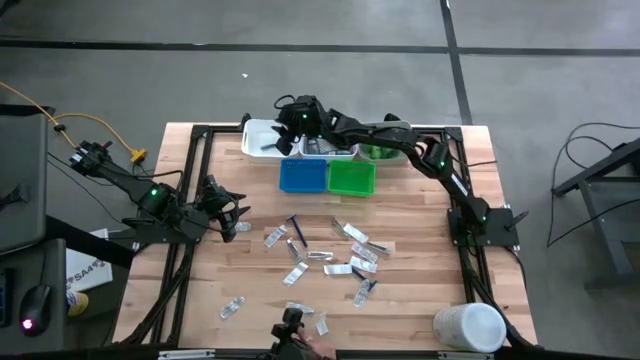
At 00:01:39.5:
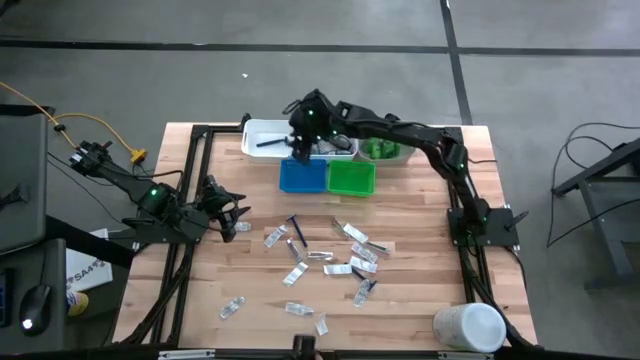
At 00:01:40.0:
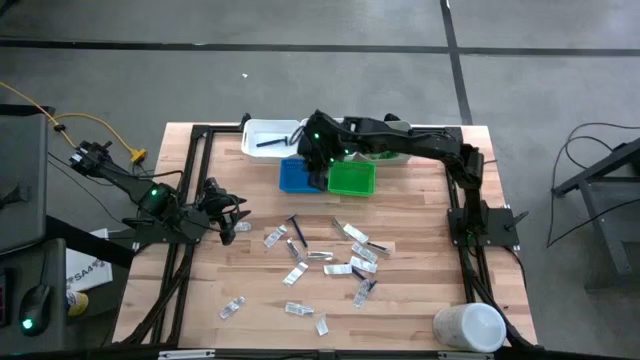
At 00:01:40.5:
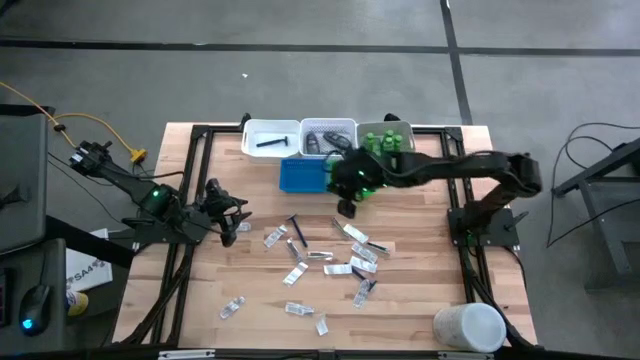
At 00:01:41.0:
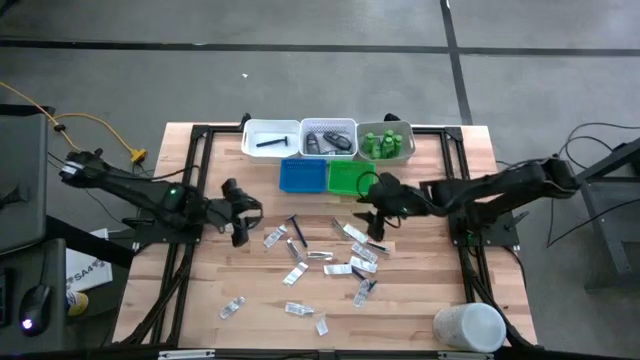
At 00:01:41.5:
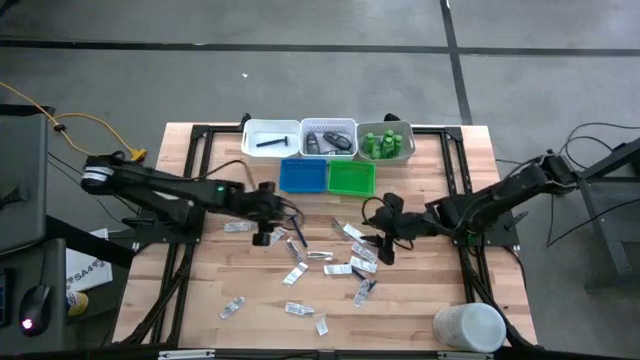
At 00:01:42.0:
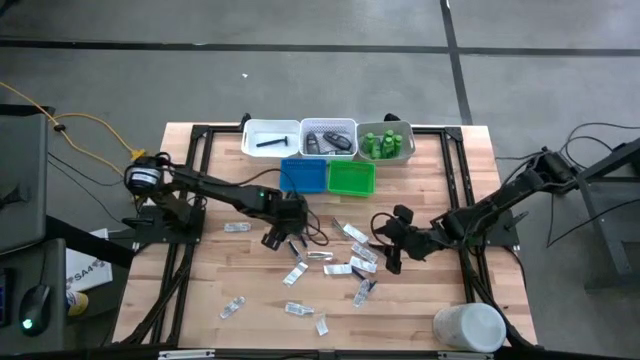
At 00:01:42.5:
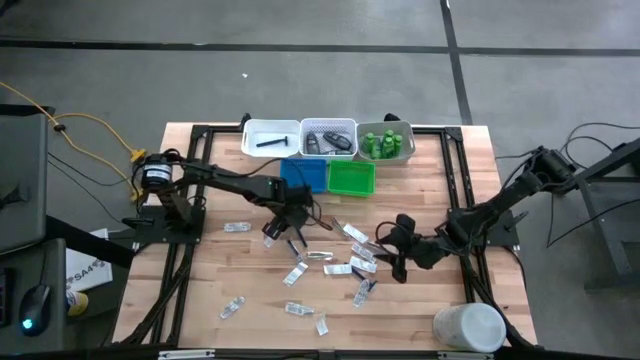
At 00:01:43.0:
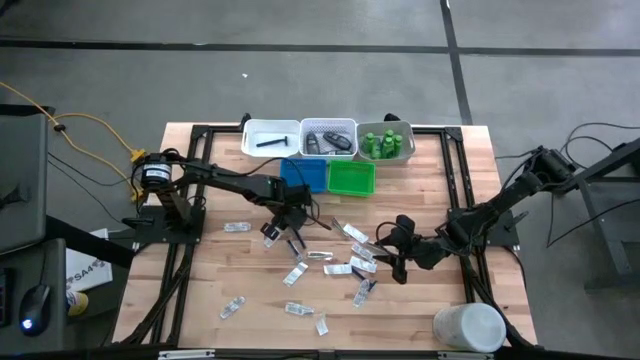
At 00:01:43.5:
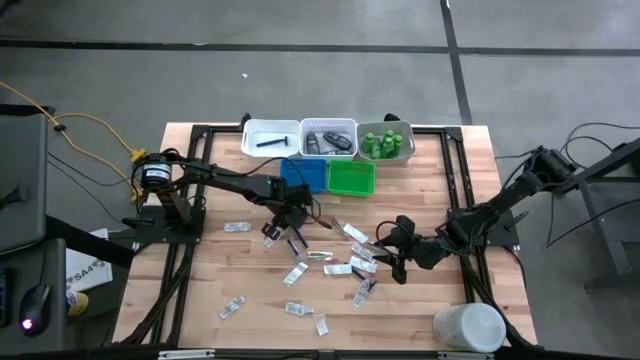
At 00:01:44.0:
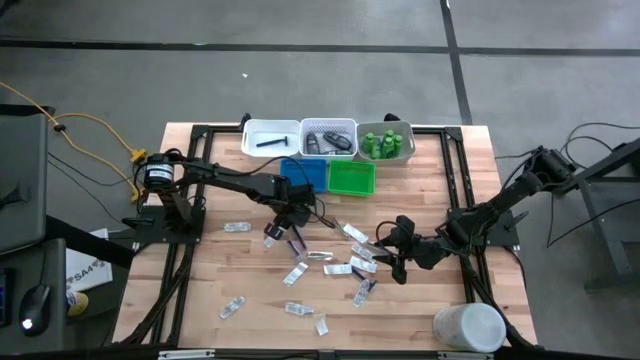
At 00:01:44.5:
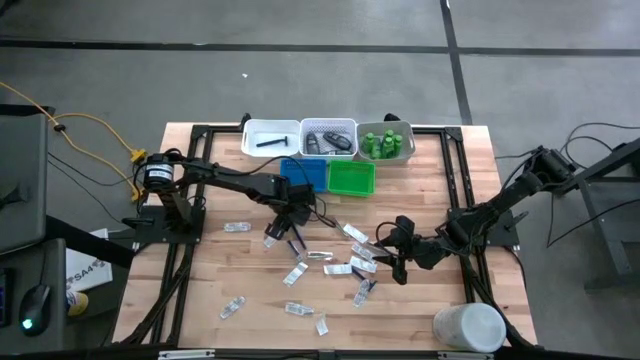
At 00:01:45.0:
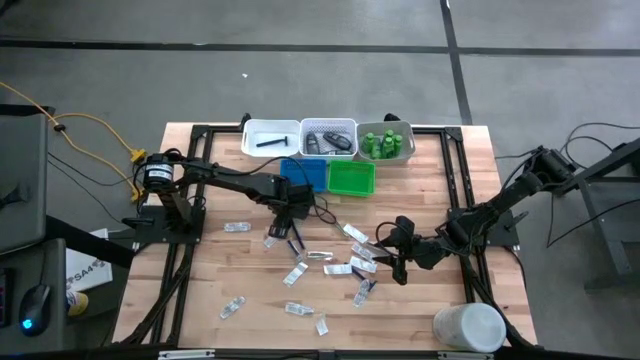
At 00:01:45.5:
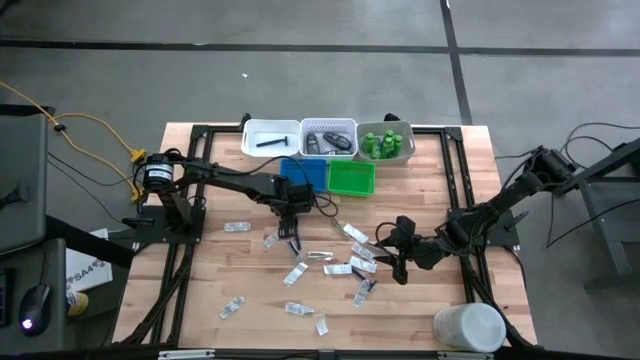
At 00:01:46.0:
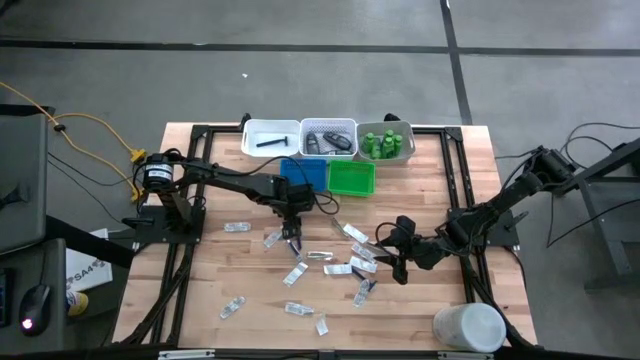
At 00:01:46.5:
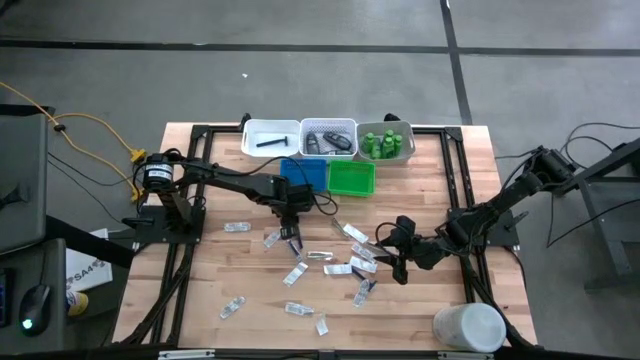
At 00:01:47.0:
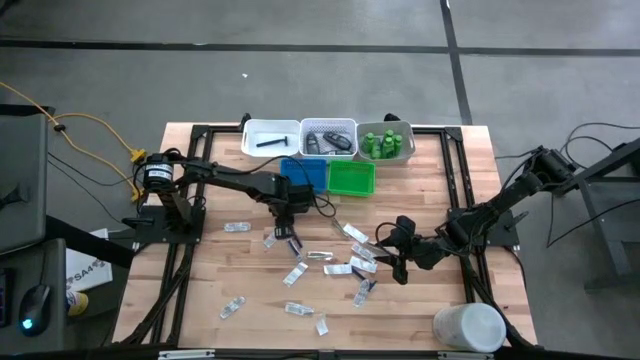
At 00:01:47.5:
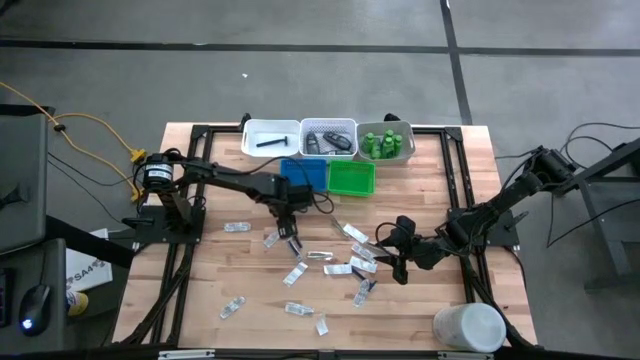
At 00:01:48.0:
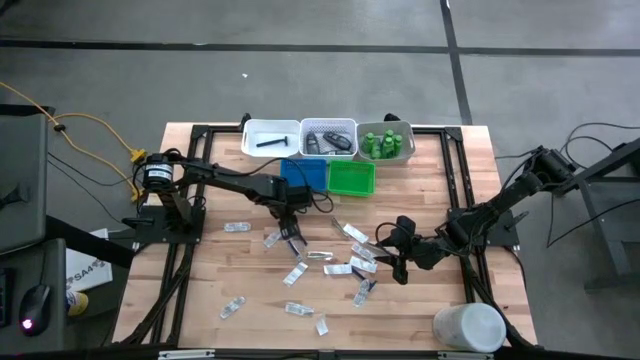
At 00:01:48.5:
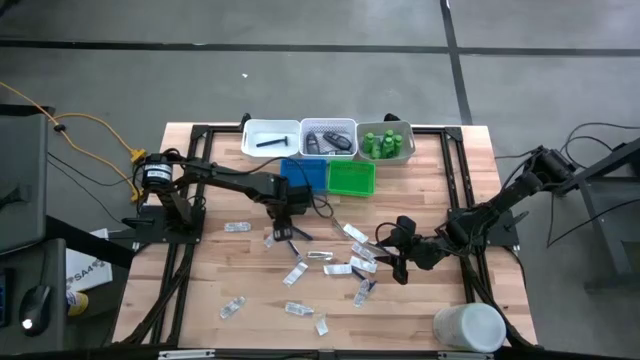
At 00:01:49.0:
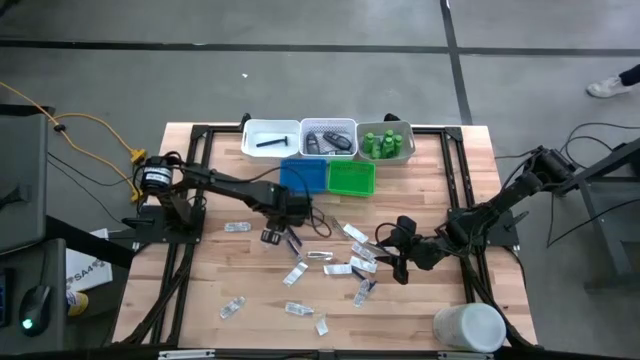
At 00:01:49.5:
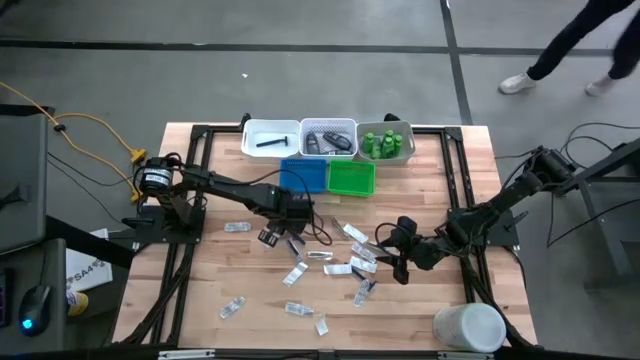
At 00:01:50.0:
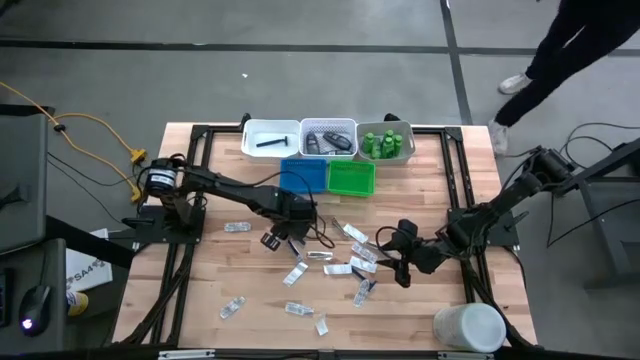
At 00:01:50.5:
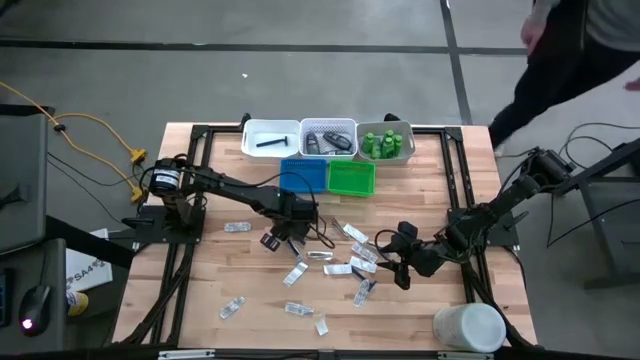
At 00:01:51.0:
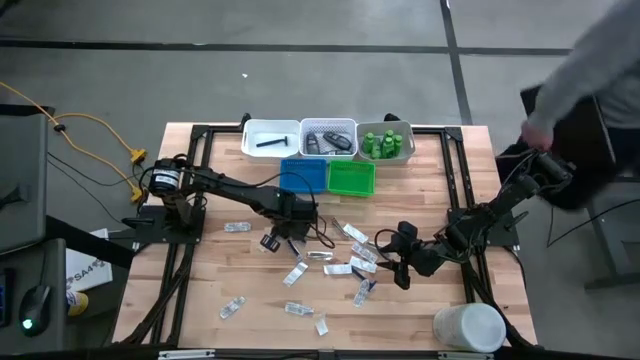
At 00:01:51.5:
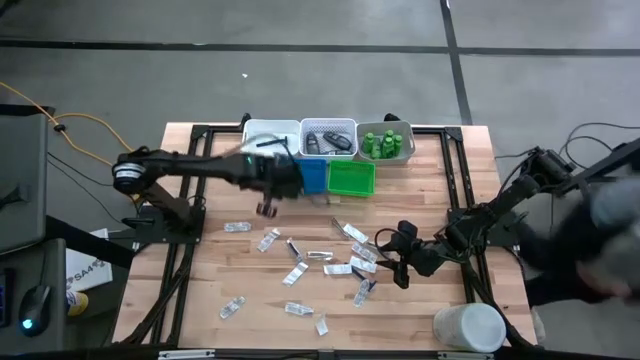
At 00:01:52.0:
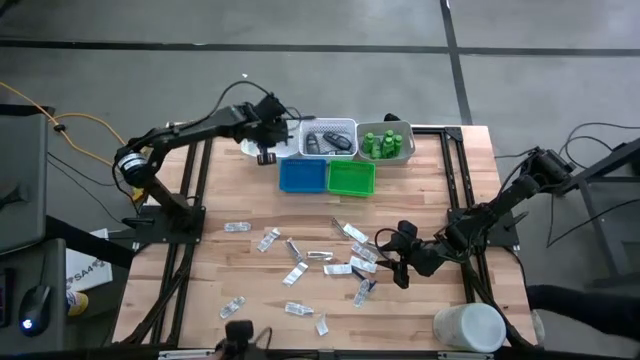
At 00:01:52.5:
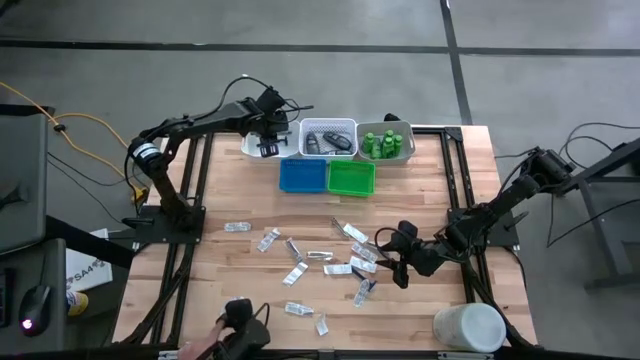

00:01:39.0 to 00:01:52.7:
Task: Pick & Place Travel size toiletries
Put the blue razor into the white bin

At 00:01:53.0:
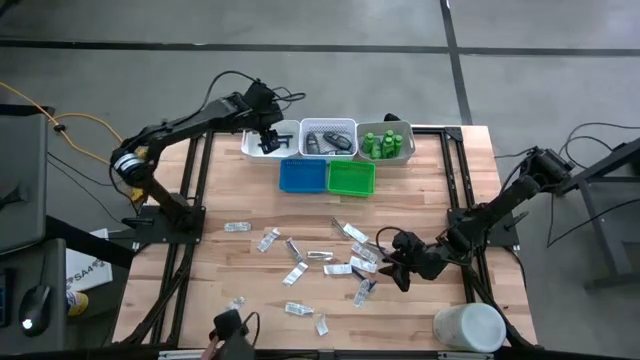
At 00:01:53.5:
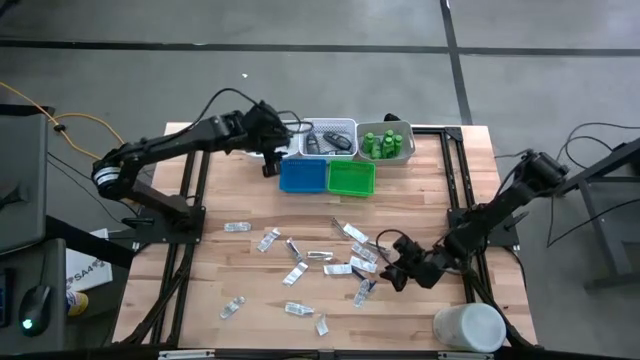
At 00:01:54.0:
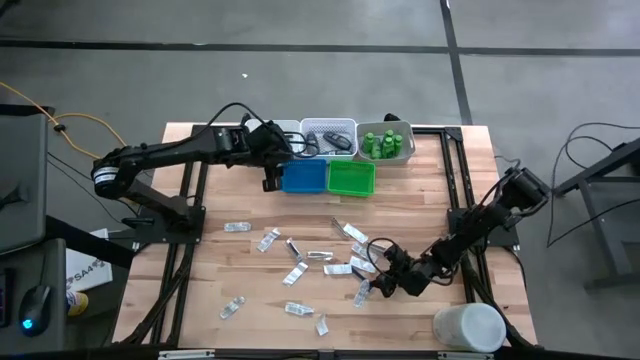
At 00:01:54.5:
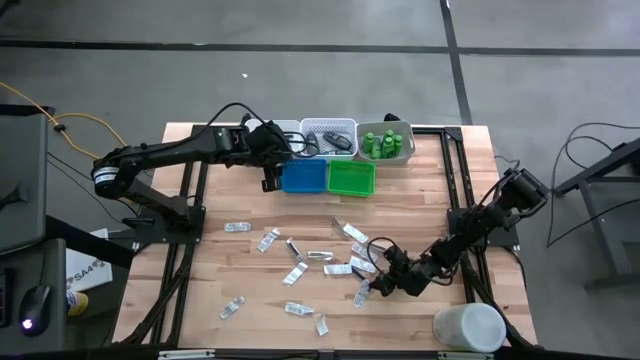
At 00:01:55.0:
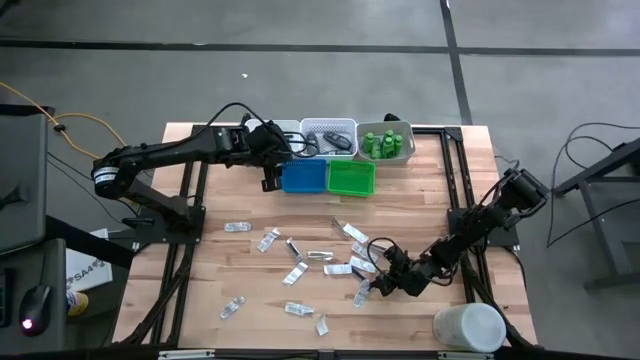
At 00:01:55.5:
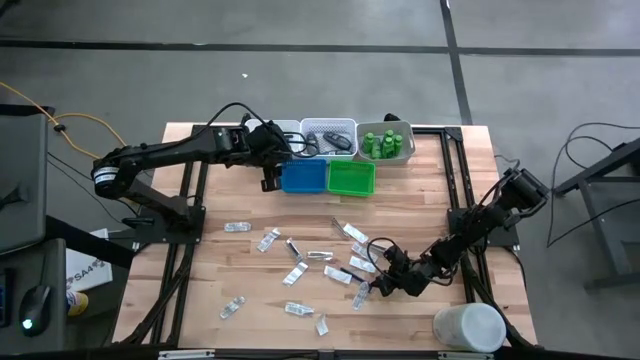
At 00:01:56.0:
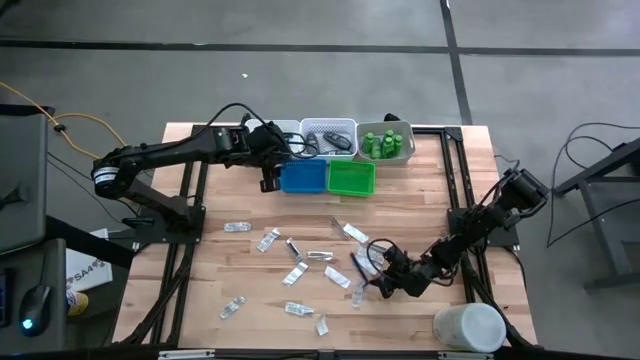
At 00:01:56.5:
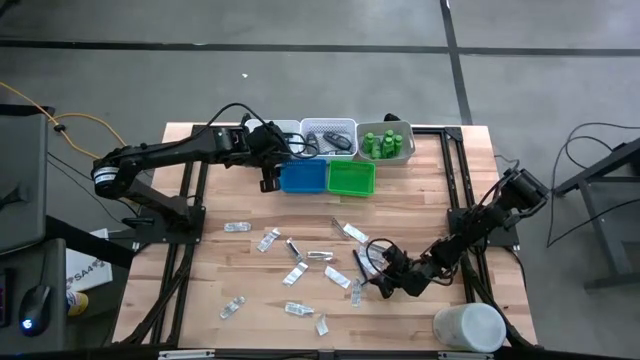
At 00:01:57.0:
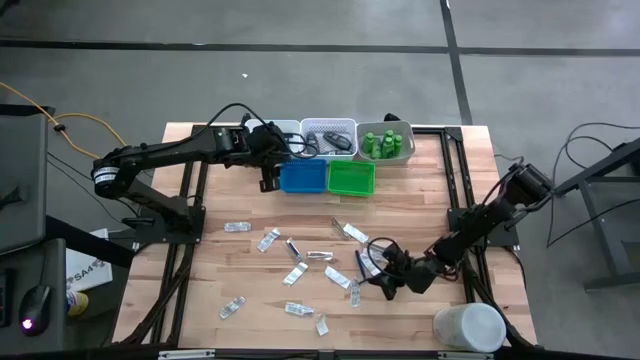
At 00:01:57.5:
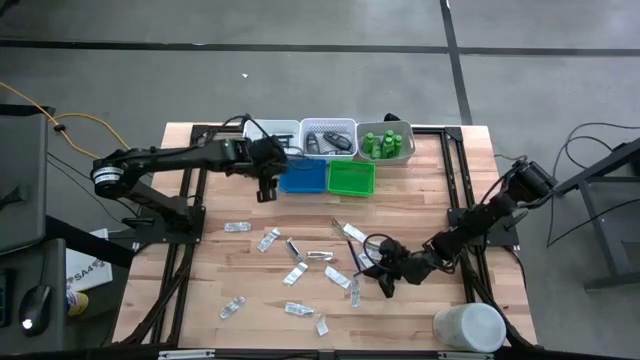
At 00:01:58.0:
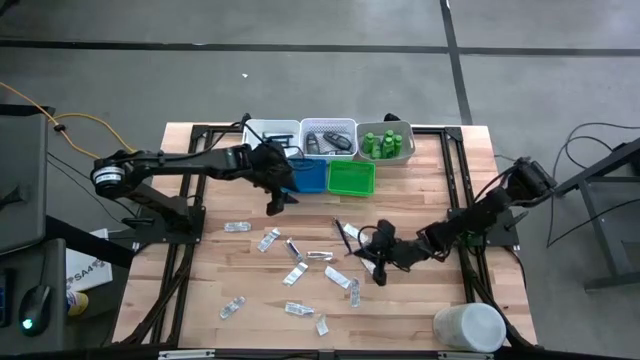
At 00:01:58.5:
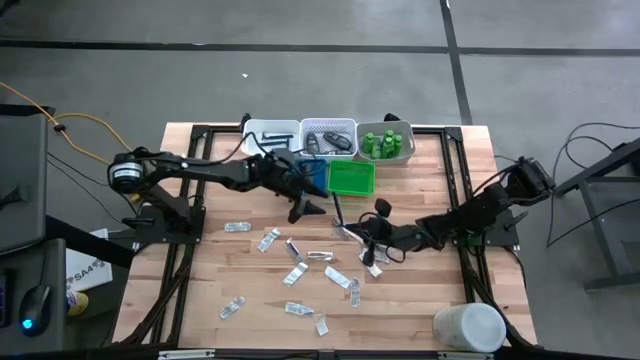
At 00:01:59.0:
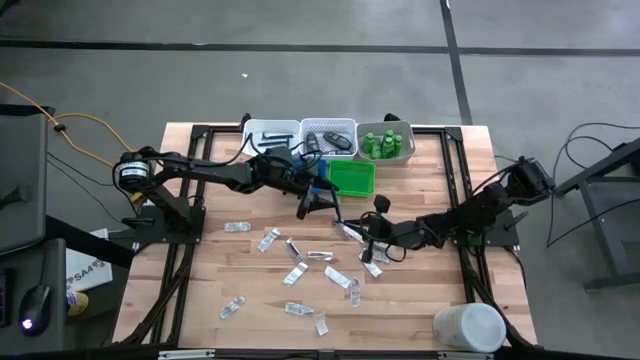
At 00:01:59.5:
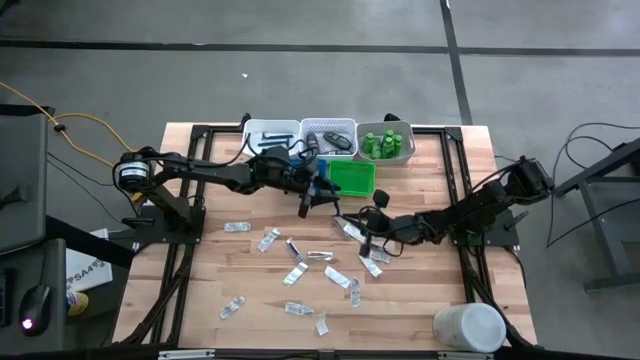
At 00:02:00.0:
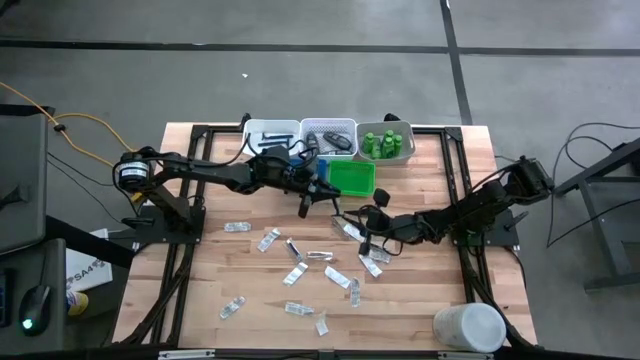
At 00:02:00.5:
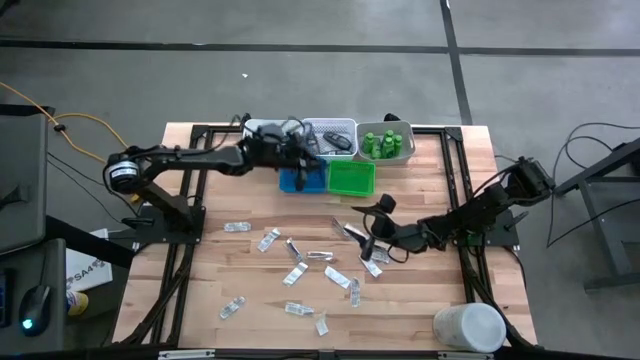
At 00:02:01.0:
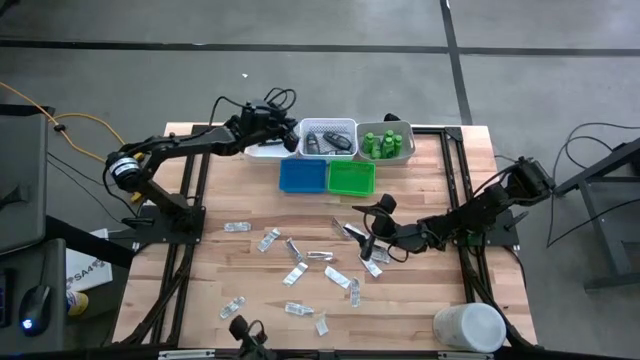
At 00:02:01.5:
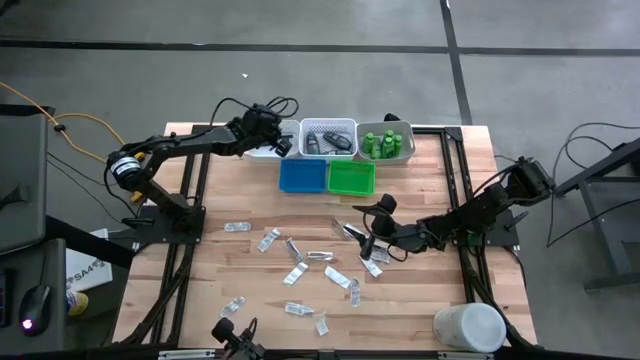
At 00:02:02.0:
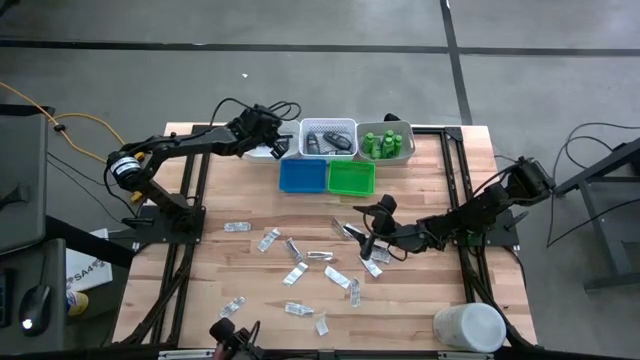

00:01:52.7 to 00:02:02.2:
Put the blue razor into the white bin
